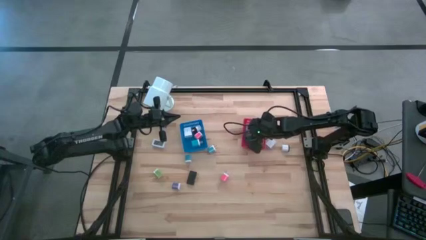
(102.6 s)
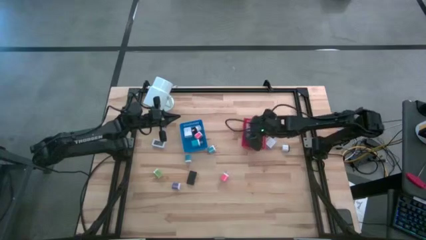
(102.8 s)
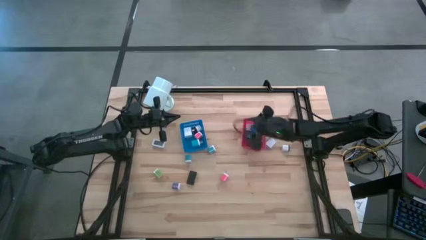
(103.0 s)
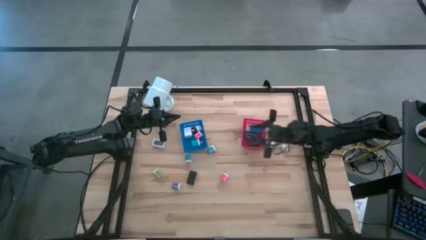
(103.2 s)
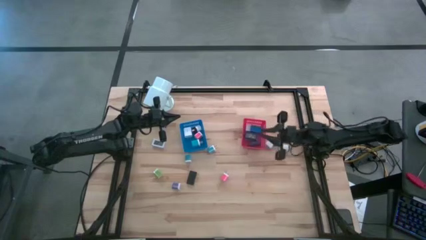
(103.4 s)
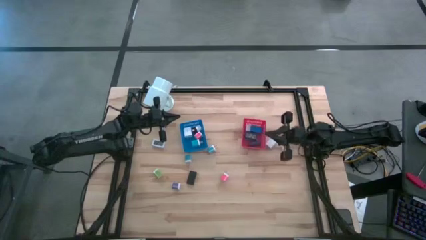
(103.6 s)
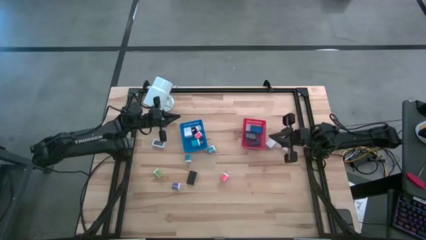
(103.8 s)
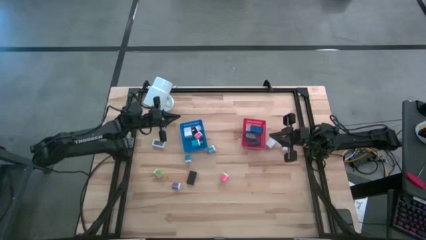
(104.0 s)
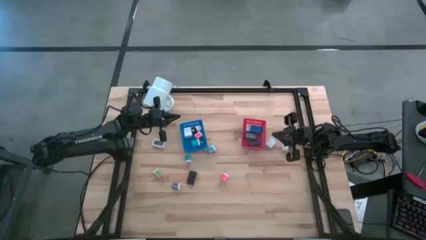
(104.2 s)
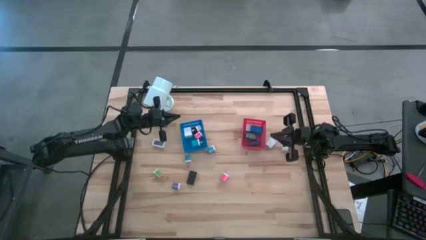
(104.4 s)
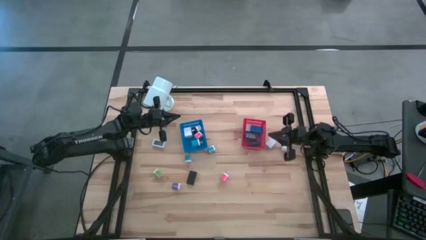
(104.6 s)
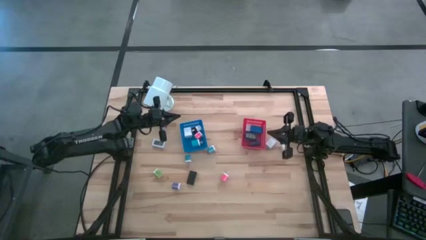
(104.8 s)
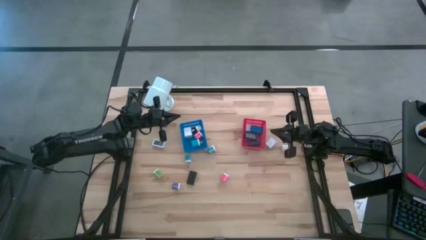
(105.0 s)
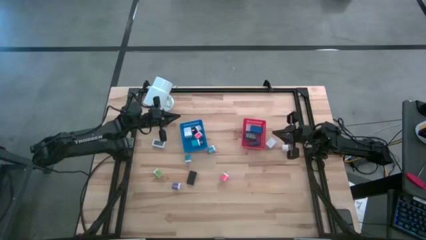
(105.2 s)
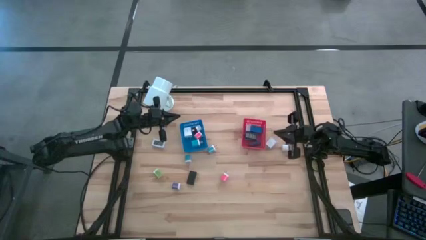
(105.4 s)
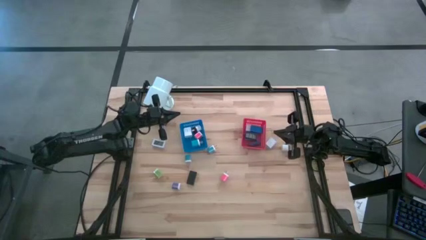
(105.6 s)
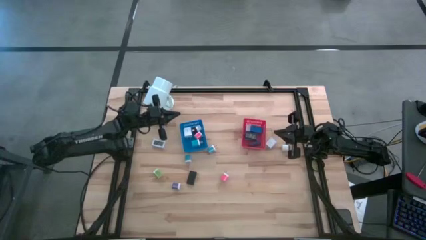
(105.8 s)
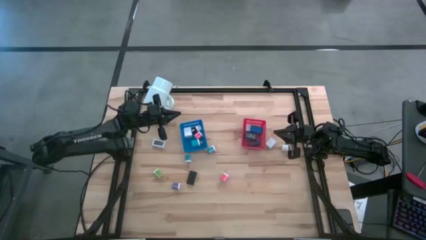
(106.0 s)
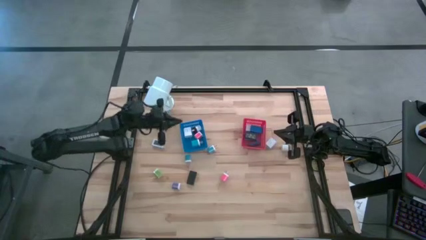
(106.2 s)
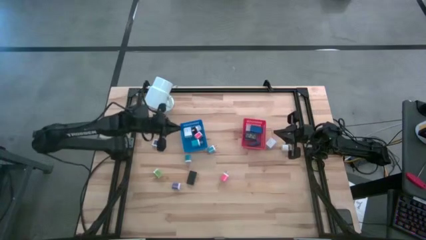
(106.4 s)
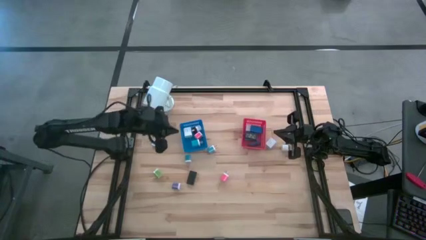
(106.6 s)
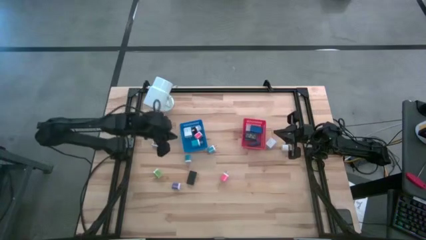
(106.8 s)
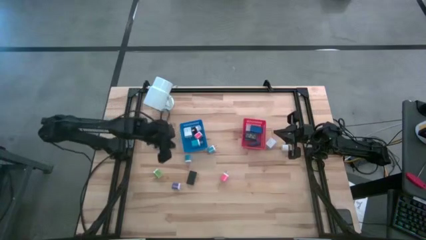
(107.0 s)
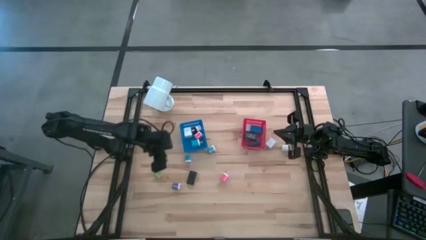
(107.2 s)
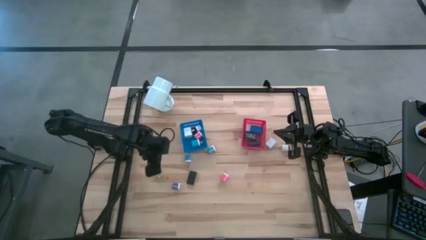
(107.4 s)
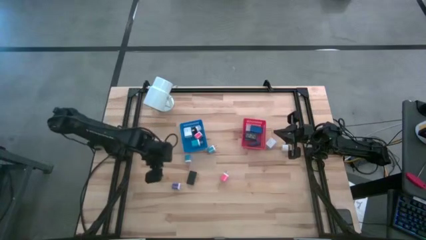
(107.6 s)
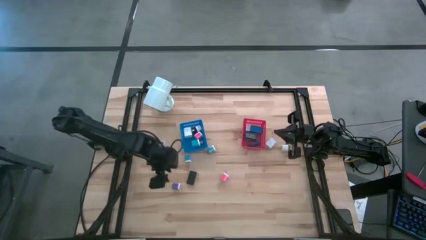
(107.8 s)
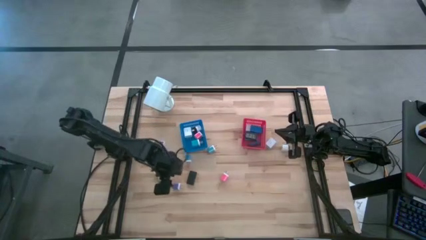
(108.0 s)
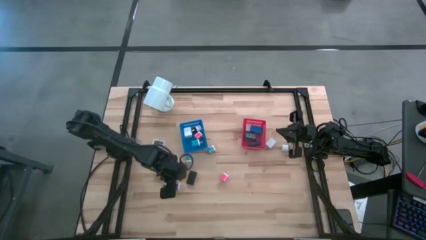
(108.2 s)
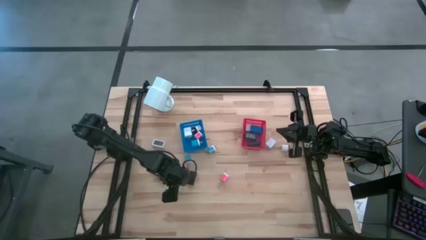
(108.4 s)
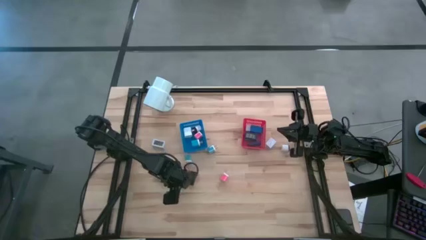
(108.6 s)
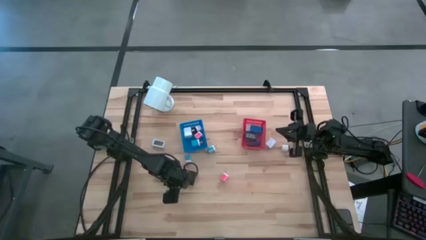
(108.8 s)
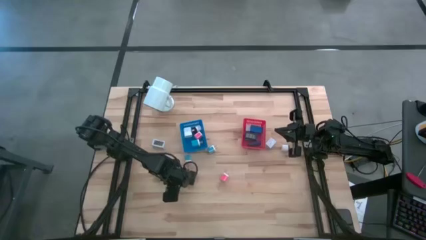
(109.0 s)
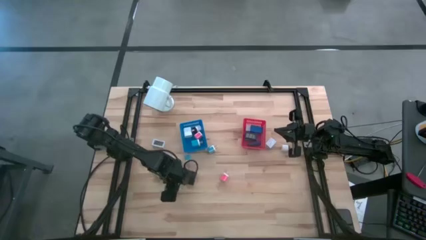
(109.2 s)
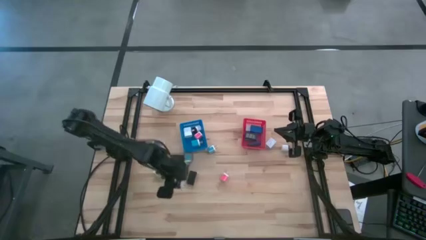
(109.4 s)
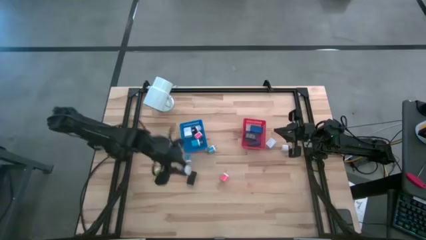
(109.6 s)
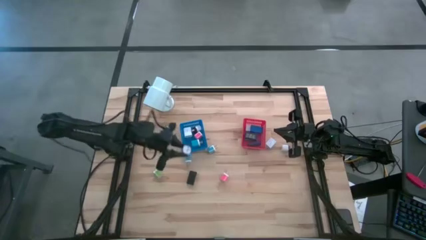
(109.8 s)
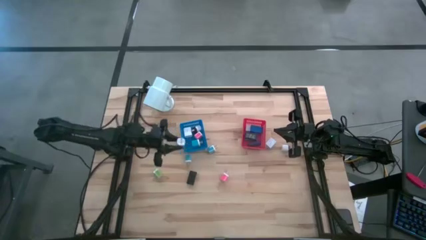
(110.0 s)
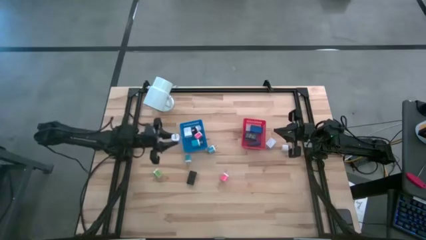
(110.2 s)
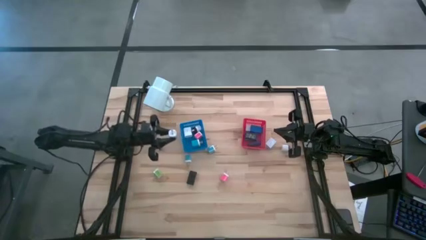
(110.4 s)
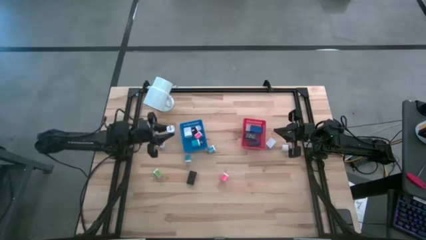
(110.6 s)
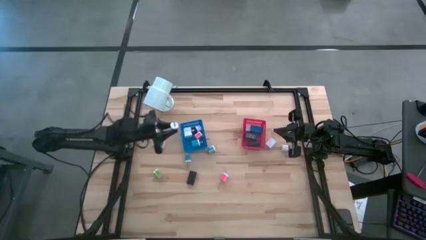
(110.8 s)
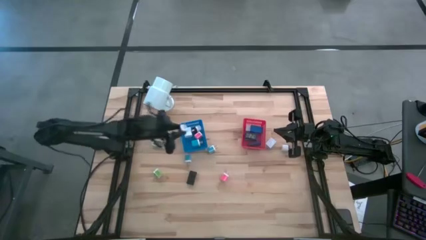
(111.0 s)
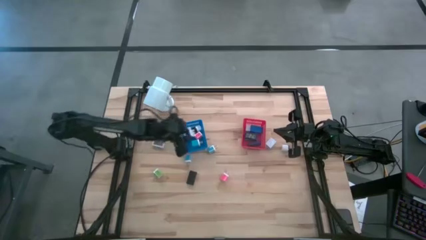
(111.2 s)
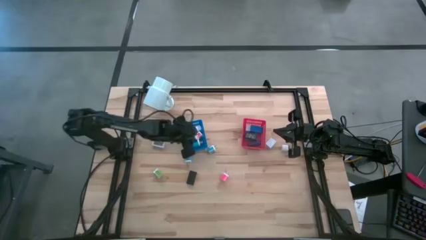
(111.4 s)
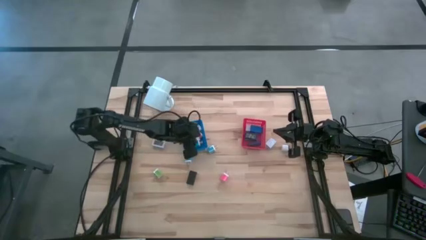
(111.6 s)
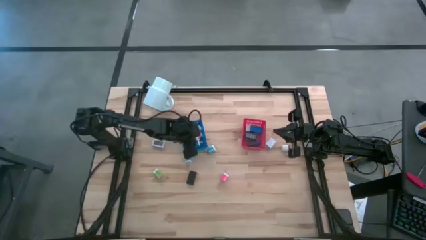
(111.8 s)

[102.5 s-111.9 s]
Task: Pick & Place Office items
Put the purple charger adapter into the blue bin
